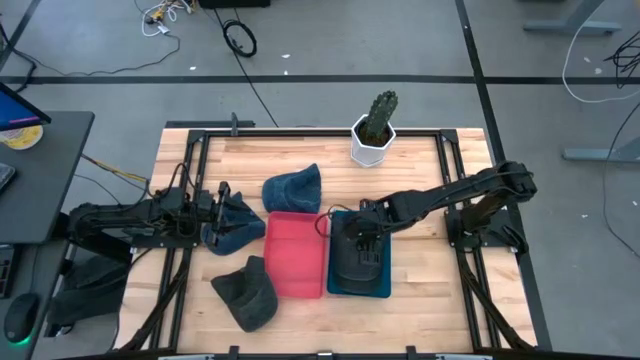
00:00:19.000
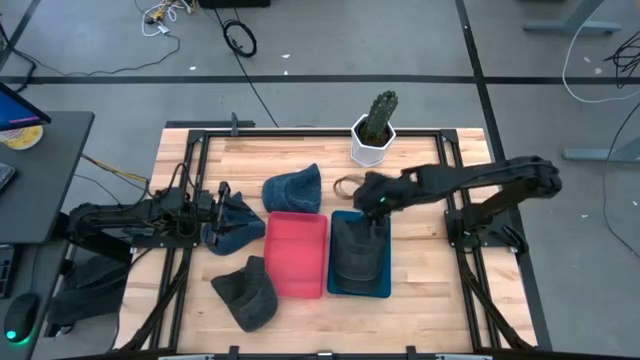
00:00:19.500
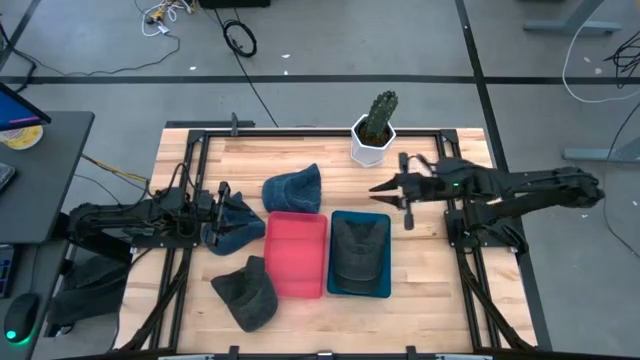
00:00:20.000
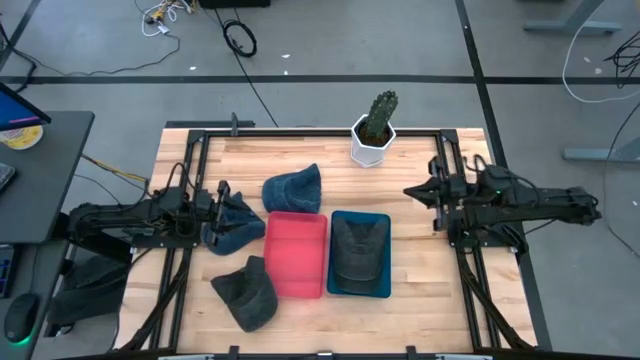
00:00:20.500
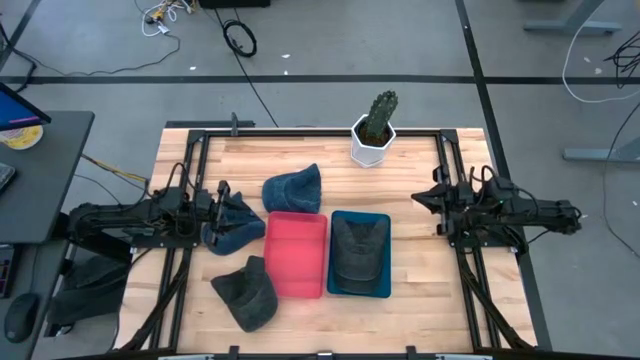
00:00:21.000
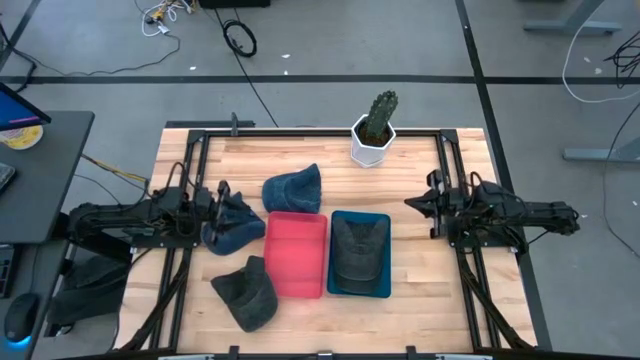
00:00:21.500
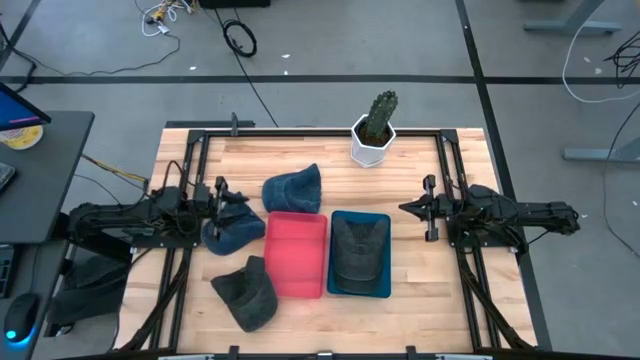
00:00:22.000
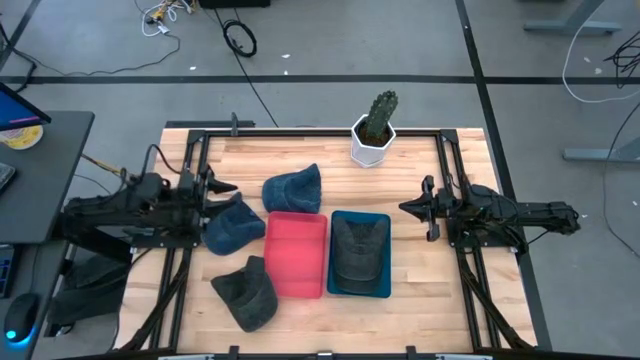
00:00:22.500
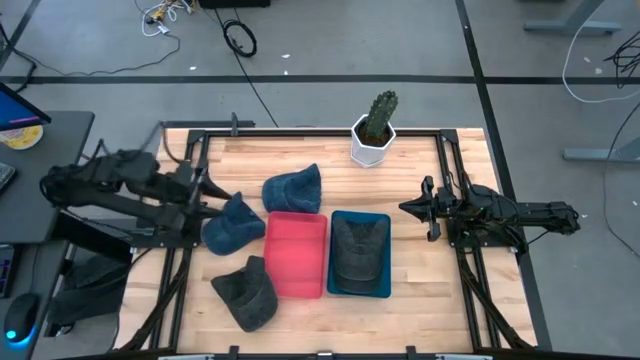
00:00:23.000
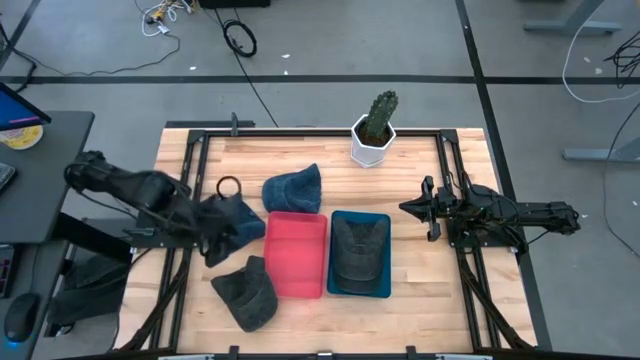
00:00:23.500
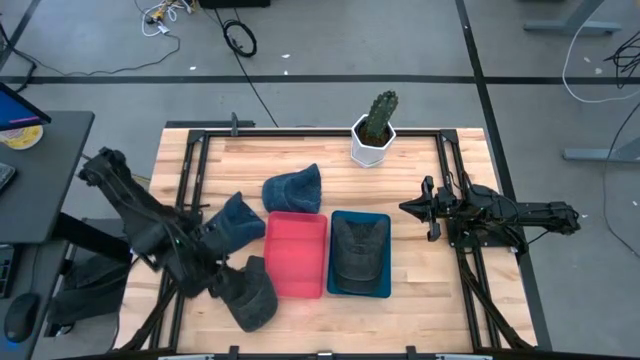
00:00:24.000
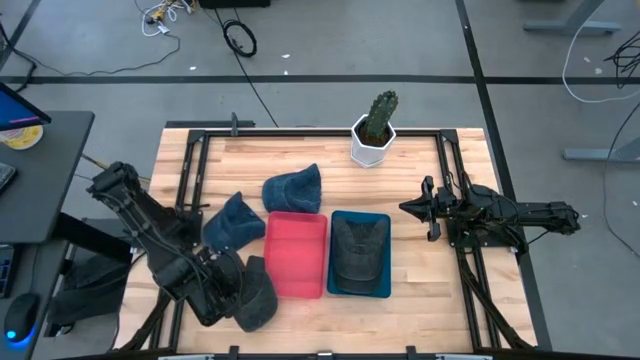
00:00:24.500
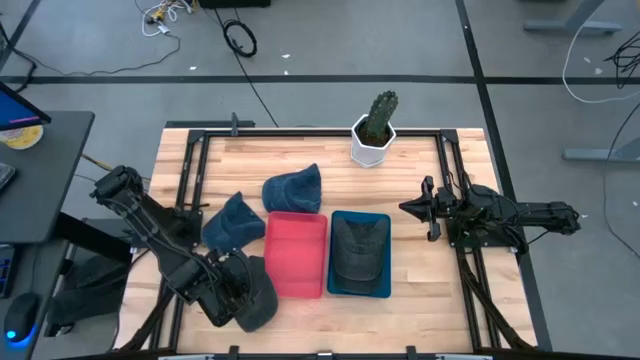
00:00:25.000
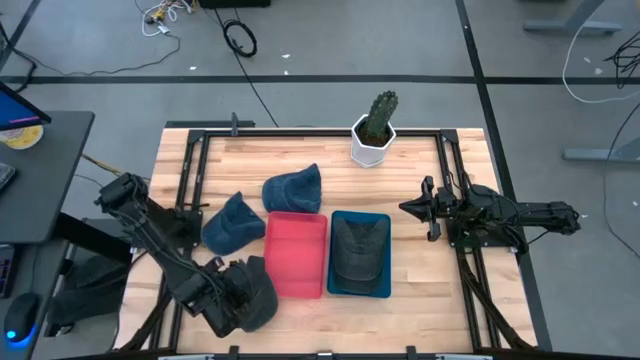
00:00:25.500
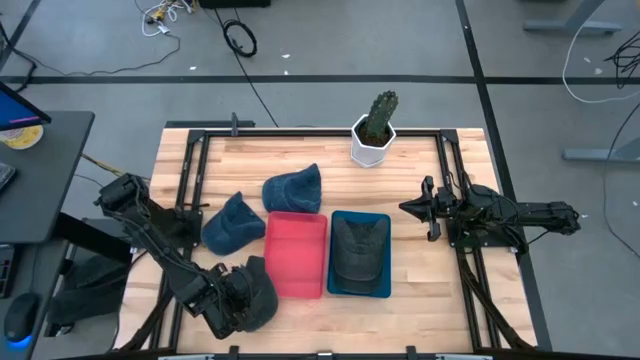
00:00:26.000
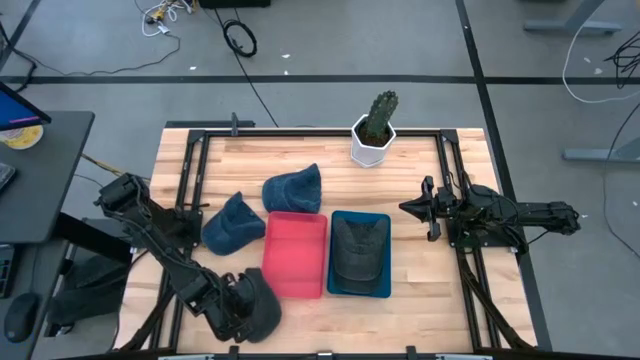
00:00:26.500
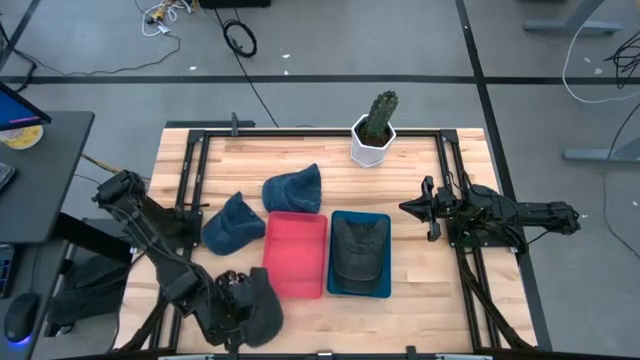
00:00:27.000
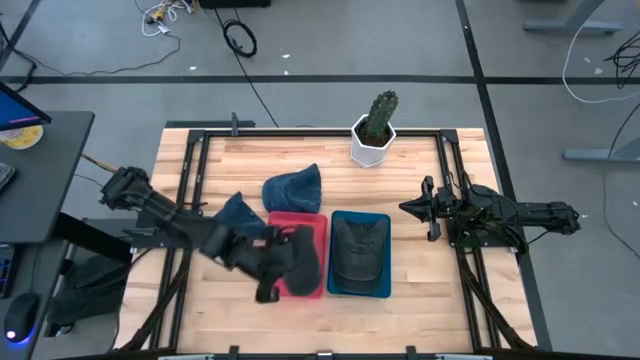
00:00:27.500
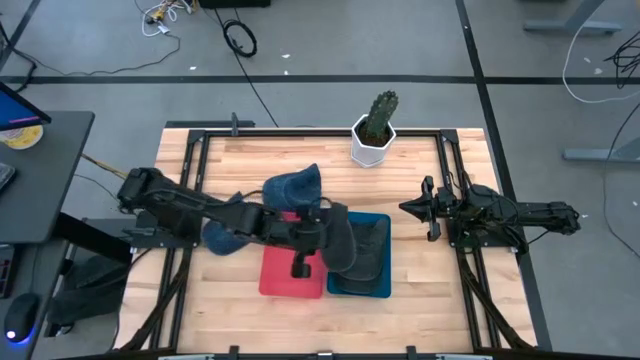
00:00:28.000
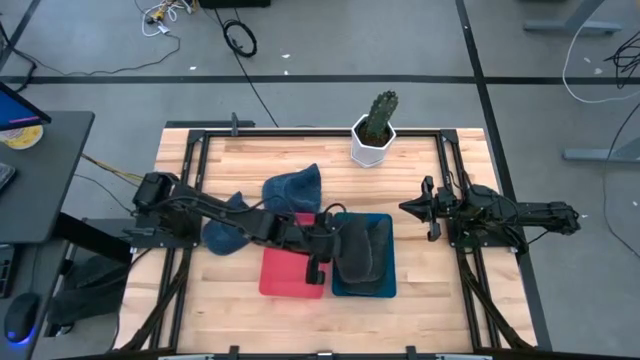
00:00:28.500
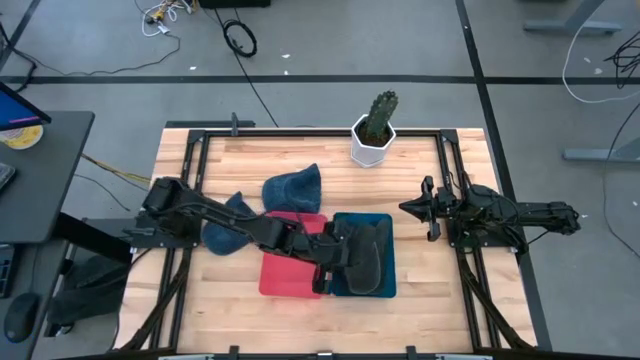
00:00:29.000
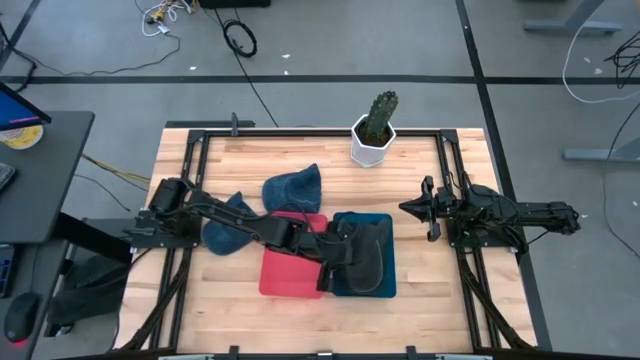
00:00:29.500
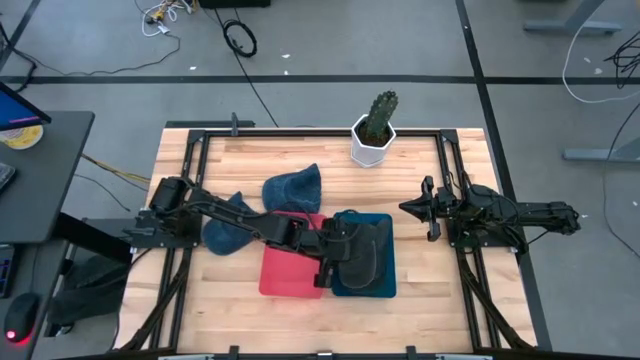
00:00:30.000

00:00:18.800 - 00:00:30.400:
Task: Pick & Place hat
Put the black cap in the blue bin

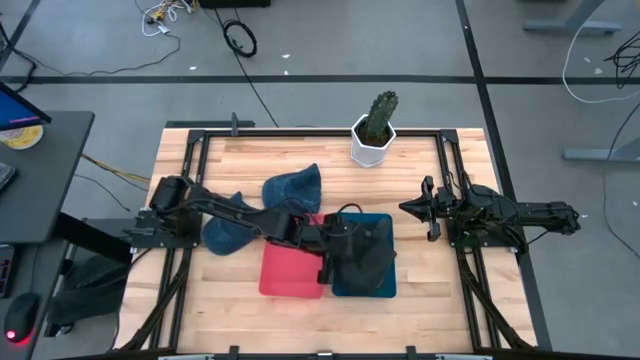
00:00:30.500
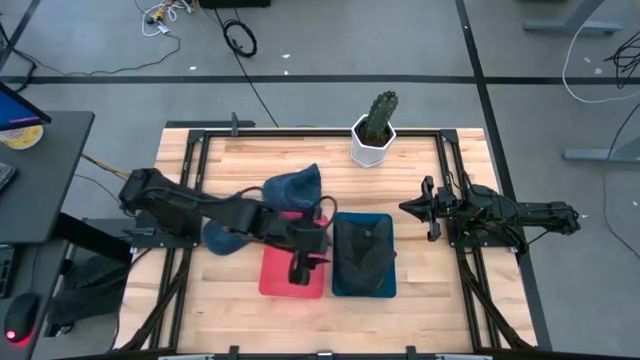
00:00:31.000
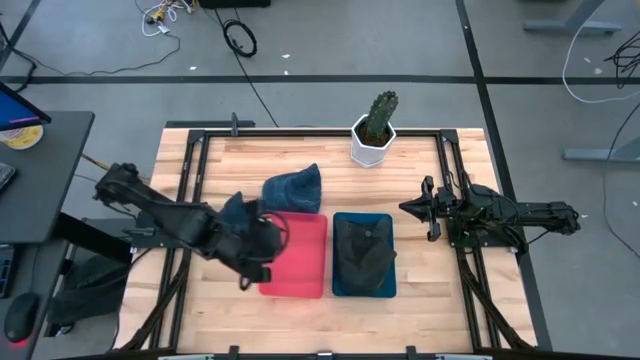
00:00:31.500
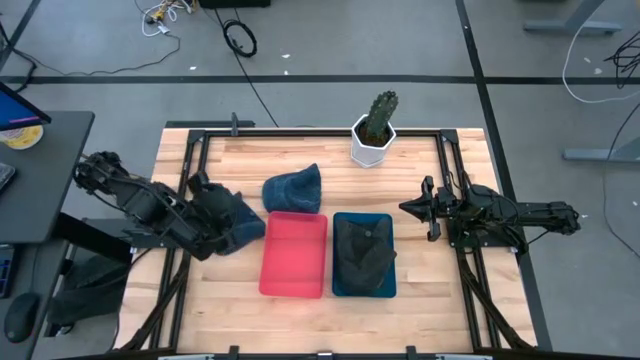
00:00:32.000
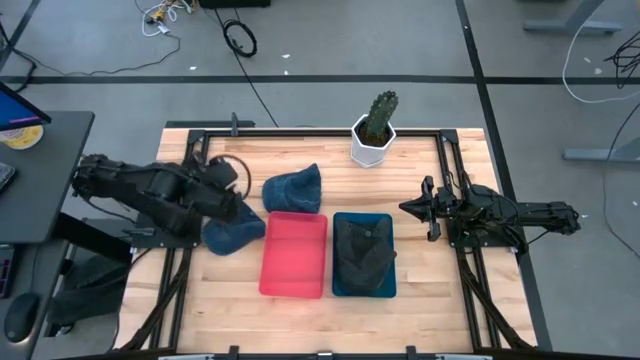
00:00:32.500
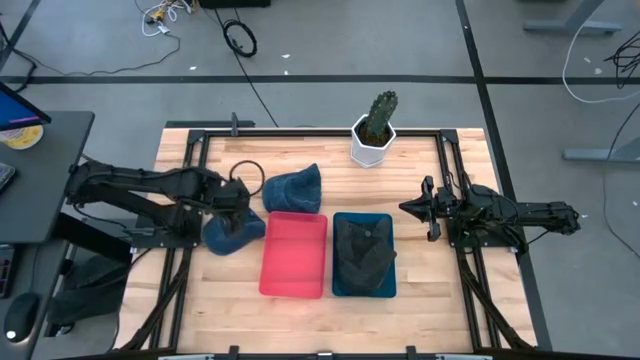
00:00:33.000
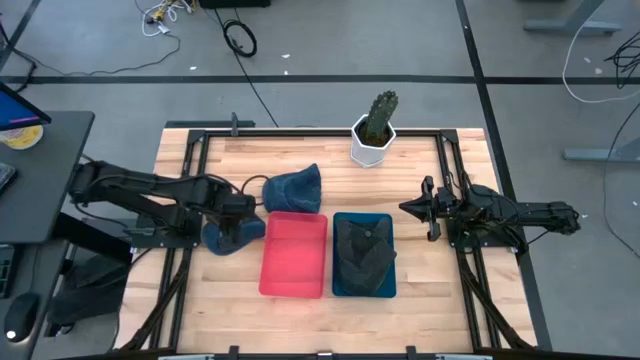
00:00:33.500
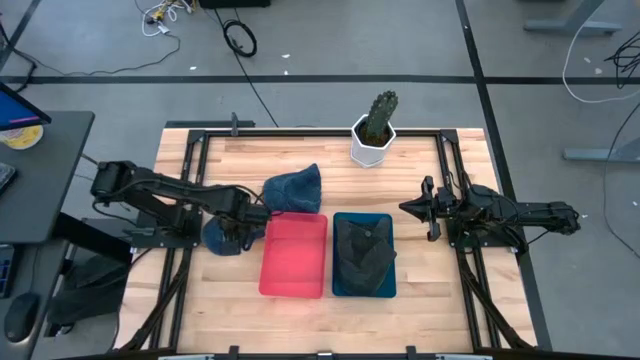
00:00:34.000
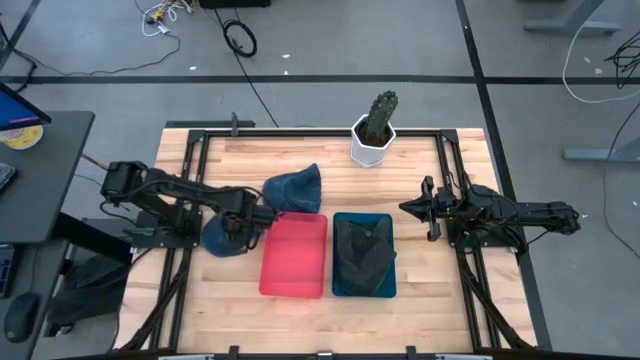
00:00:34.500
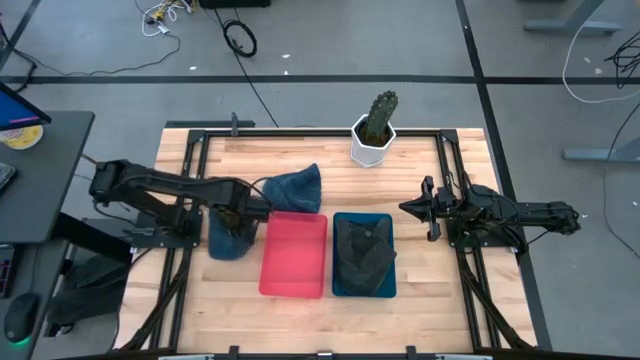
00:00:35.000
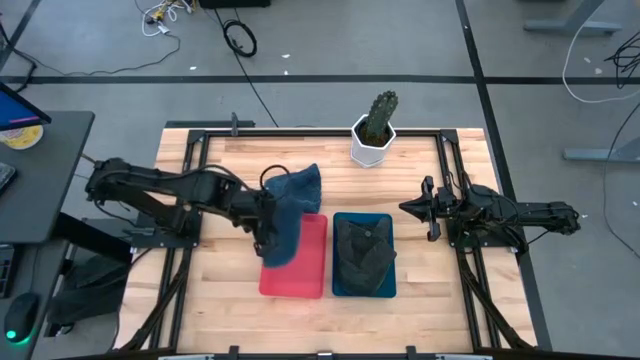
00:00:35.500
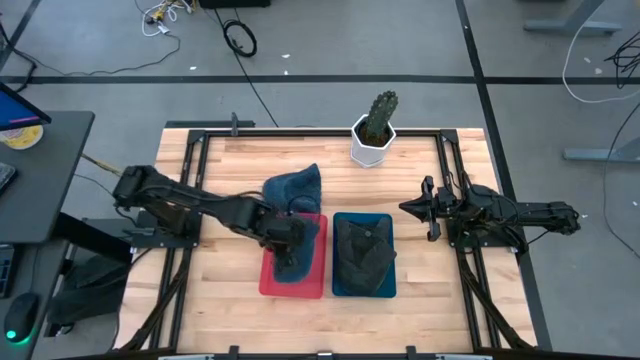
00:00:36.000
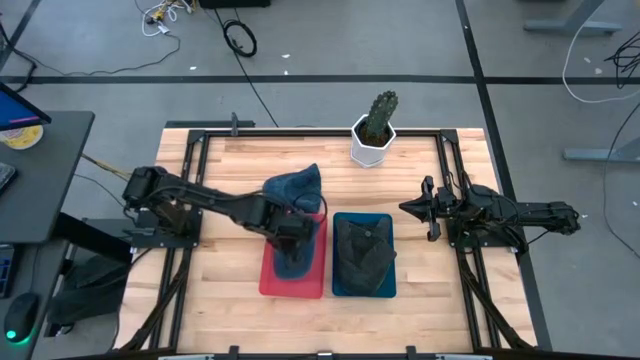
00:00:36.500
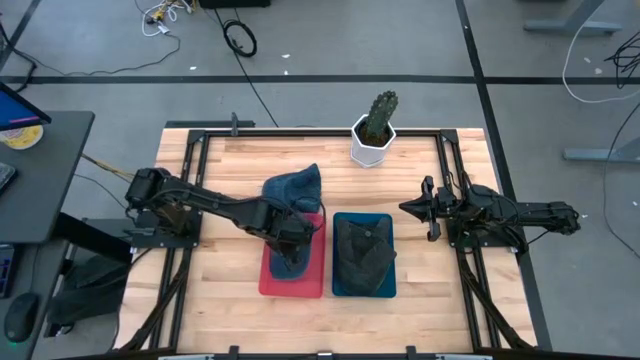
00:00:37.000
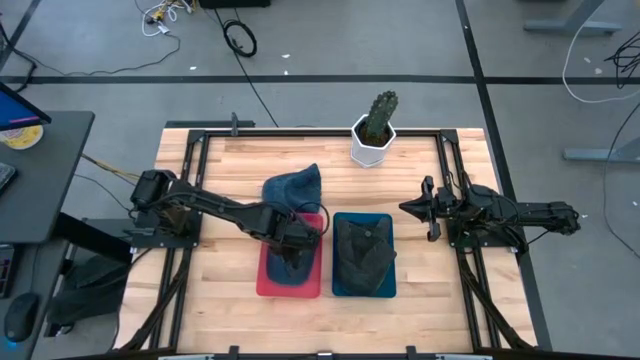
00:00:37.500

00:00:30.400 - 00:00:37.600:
Put the left blue cap in the red bin

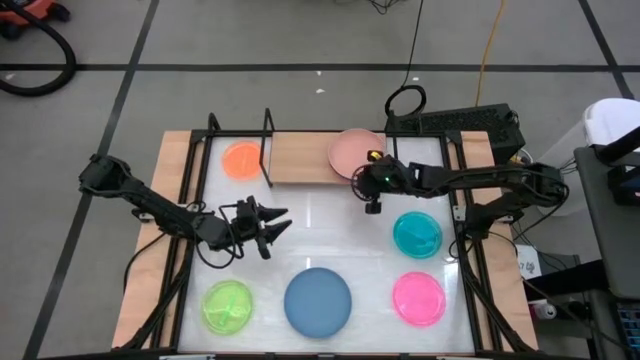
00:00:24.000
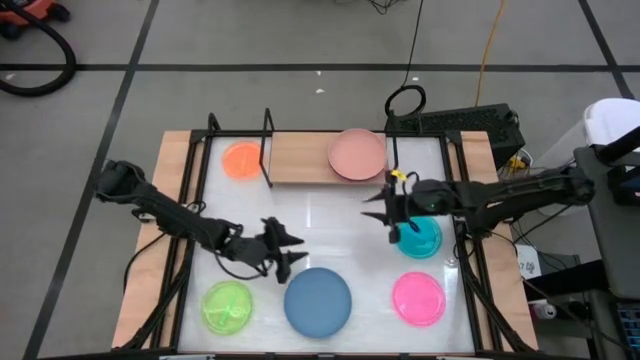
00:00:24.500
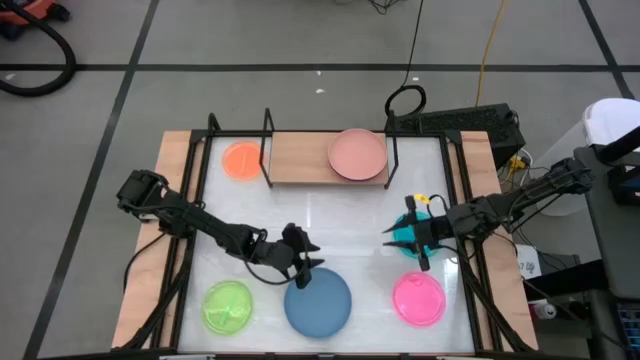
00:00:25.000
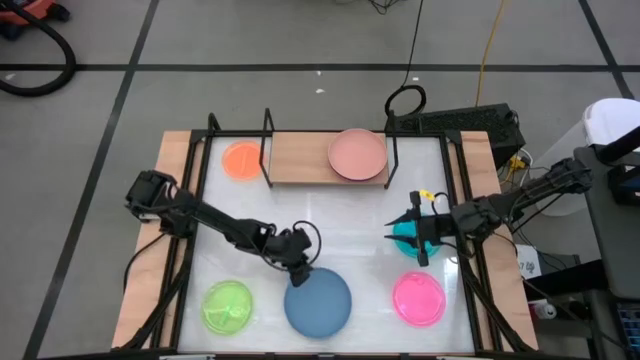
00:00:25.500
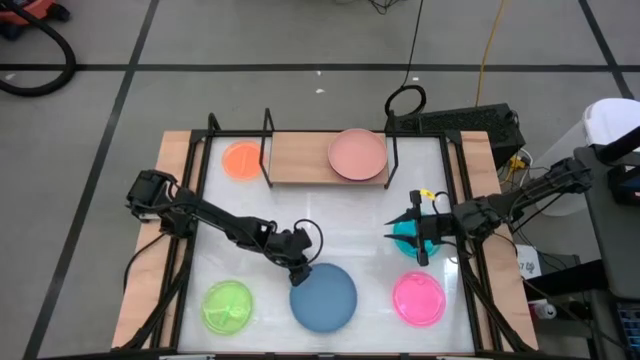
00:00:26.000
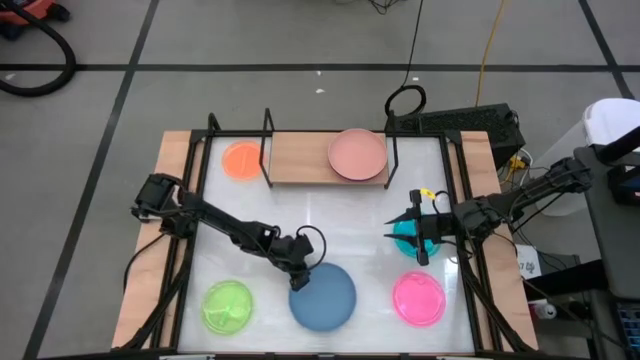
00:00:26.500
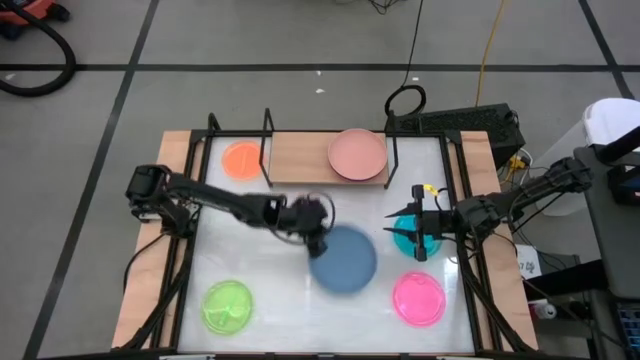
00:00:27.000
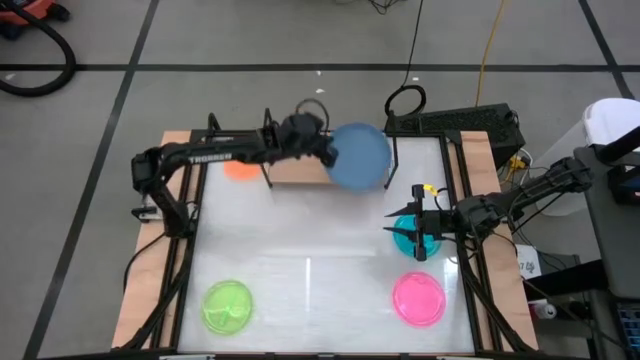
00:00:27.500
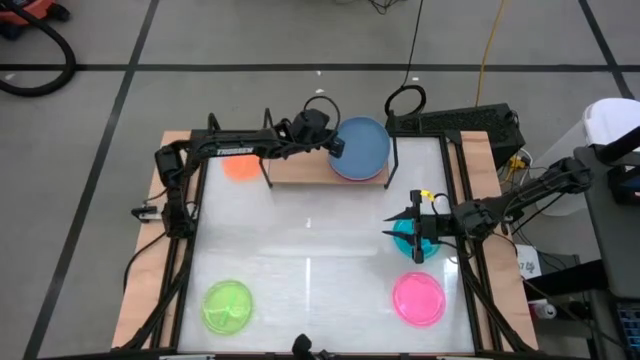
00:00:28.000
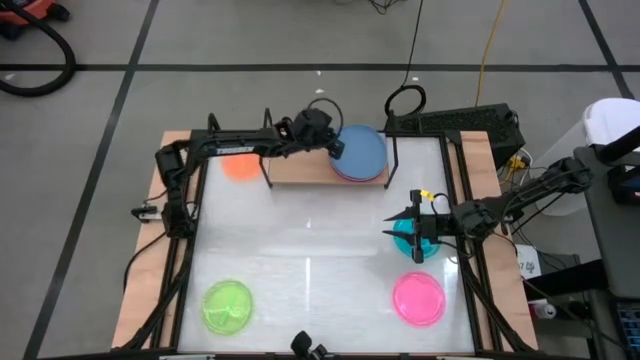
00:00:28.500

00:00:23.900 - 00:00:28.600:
Task: Place and stack plates onto a shelf
Stack the blue plate on the orange plate
